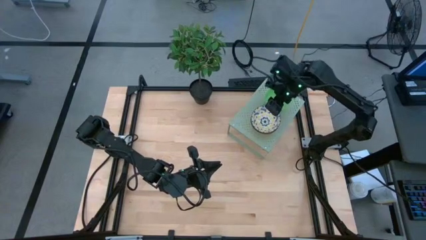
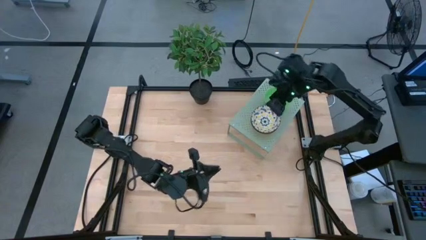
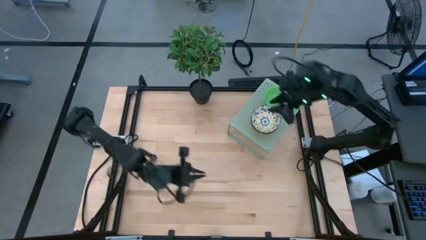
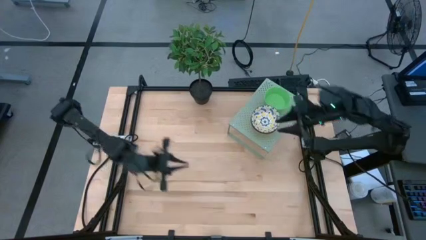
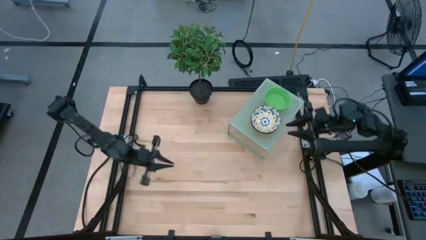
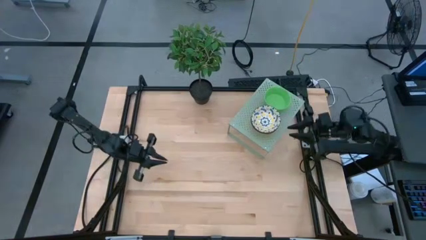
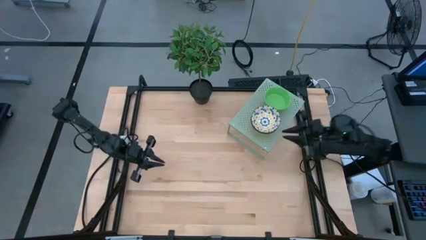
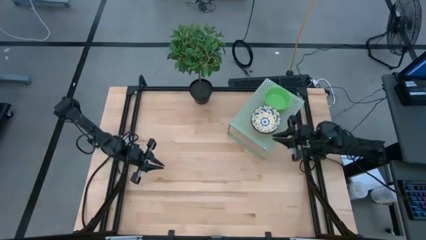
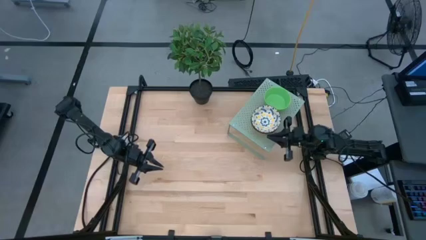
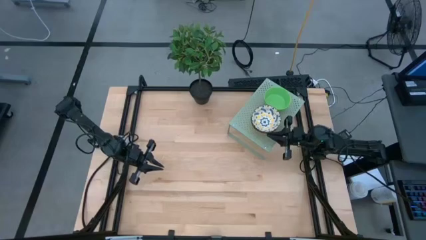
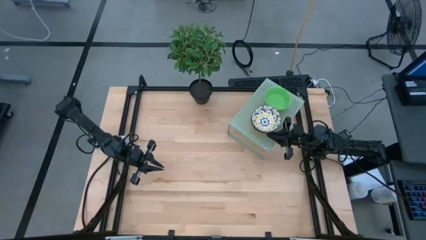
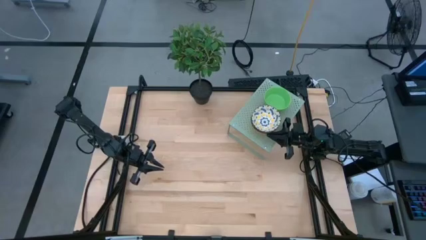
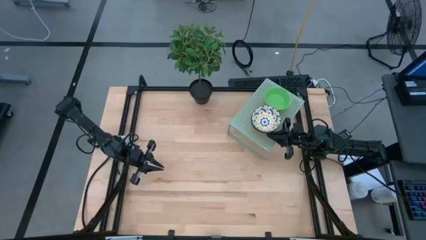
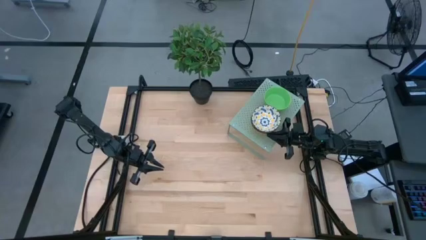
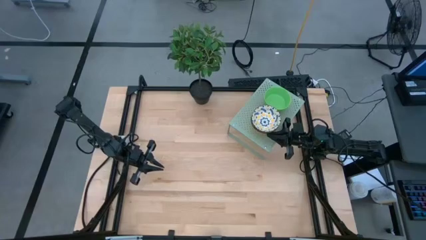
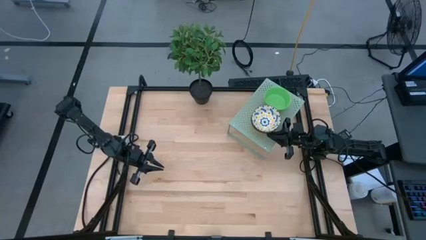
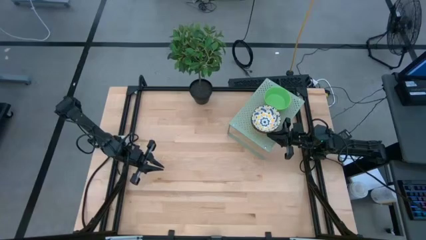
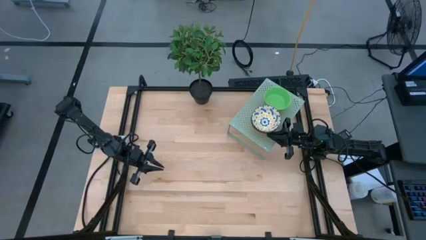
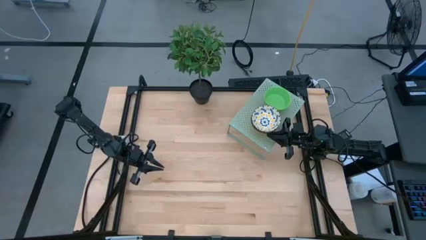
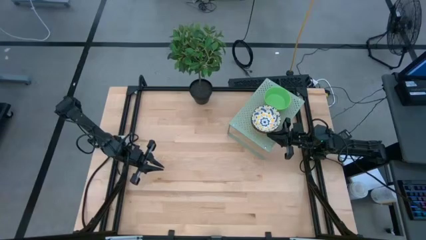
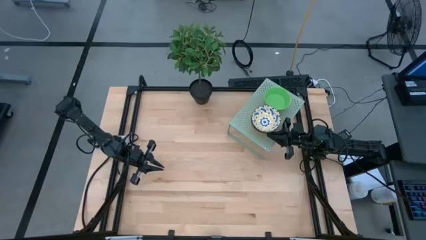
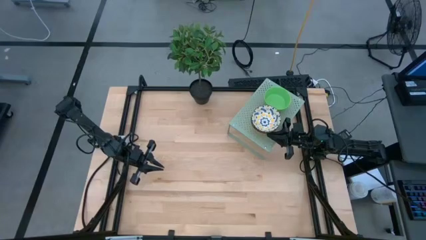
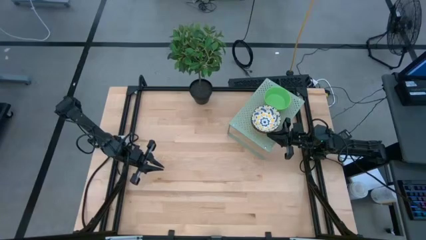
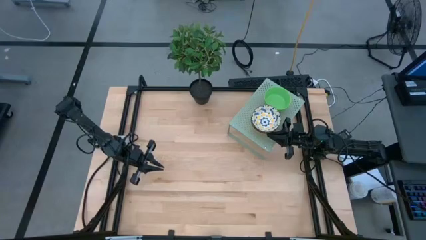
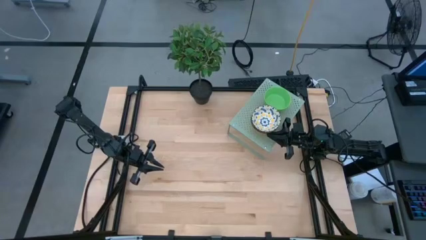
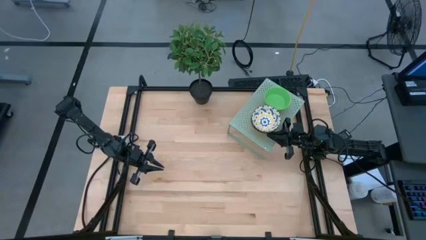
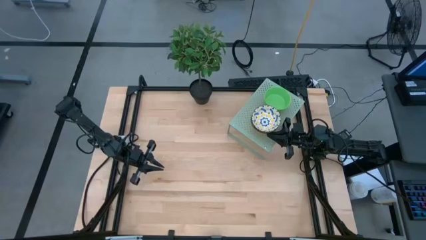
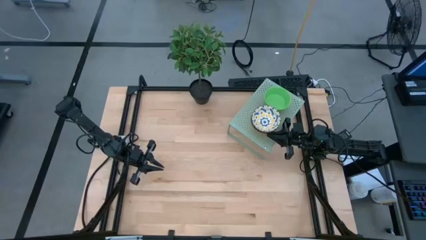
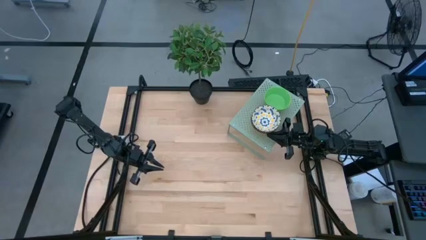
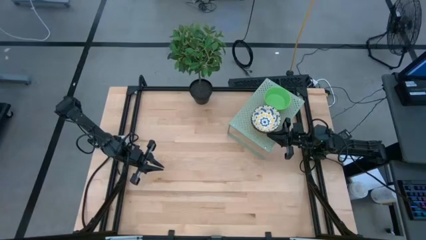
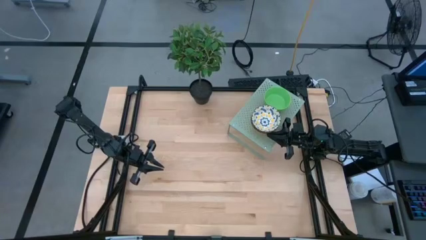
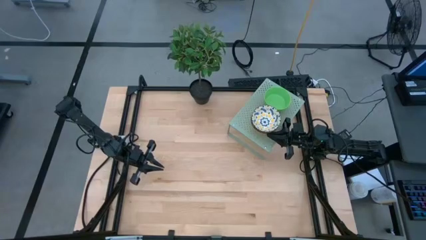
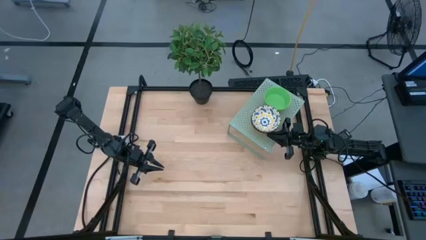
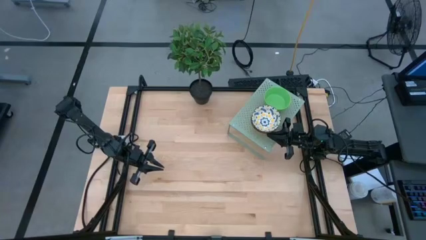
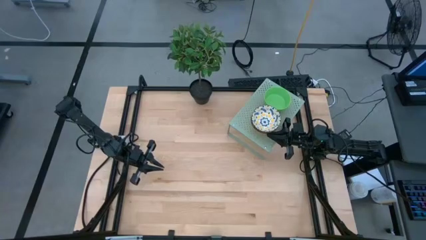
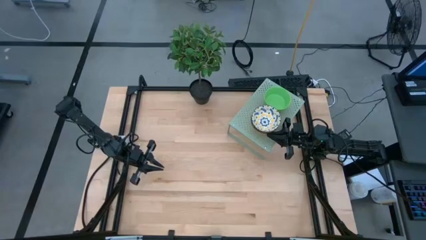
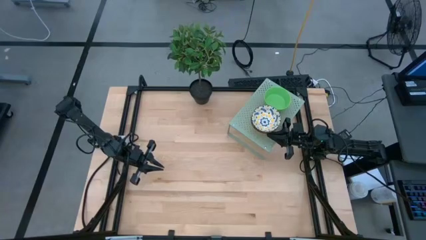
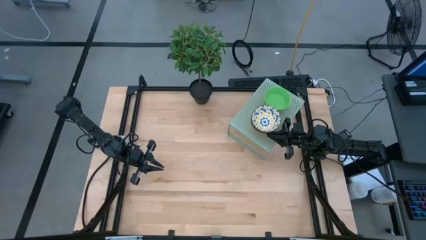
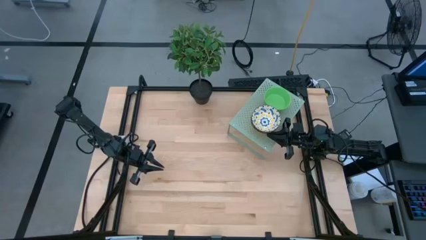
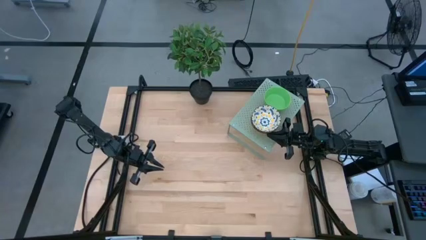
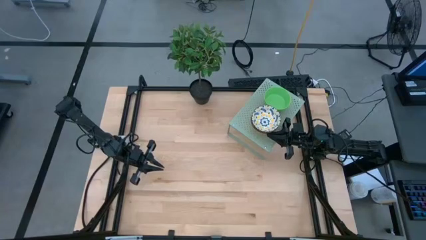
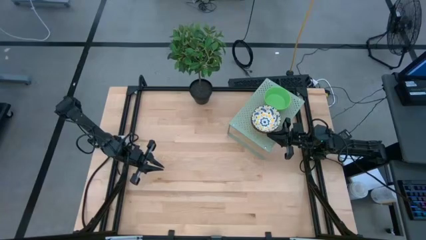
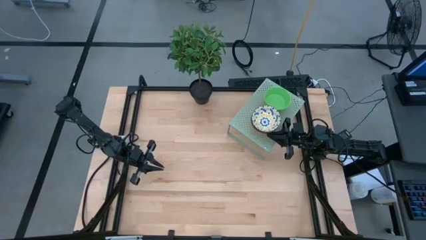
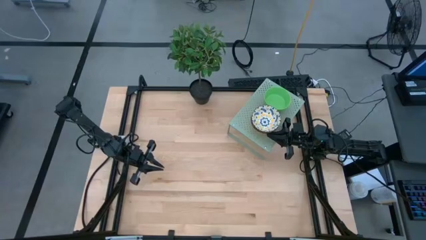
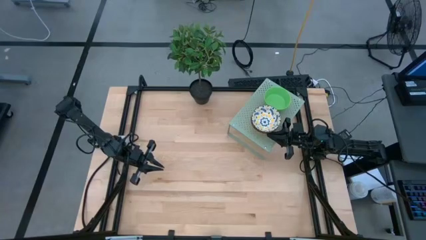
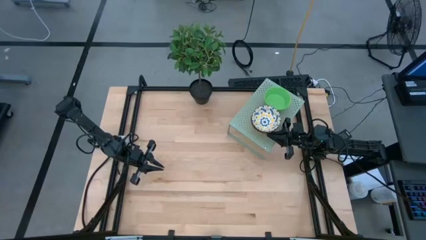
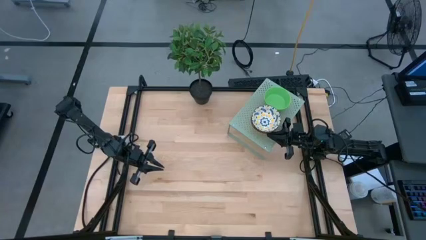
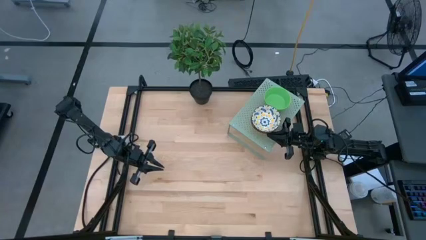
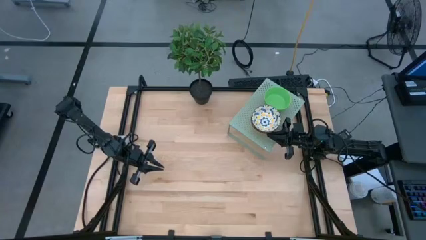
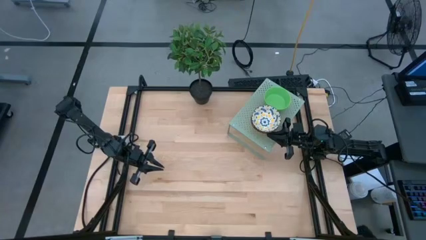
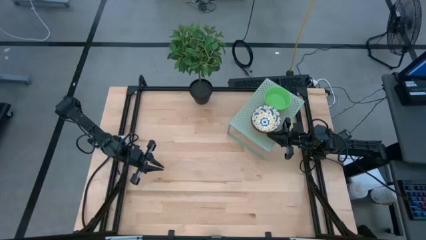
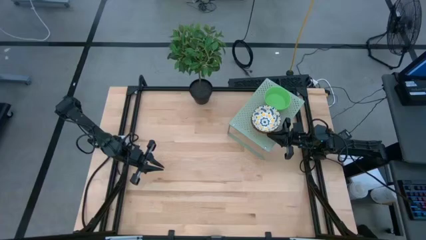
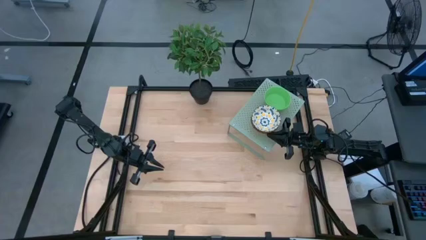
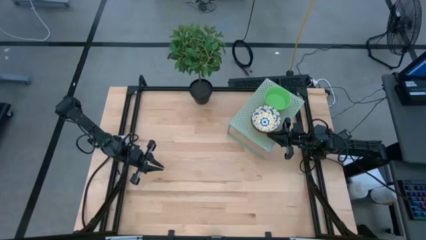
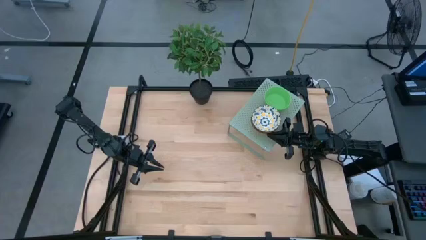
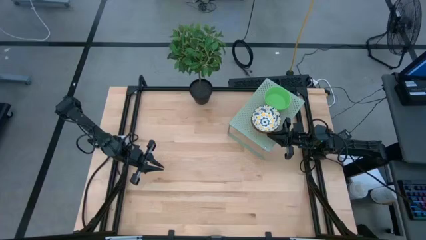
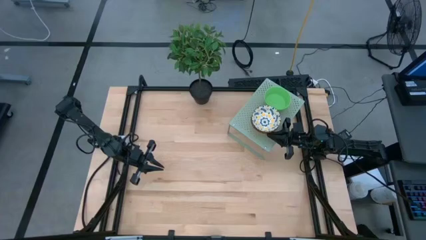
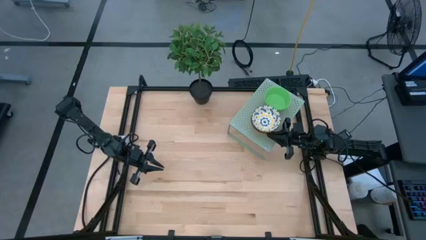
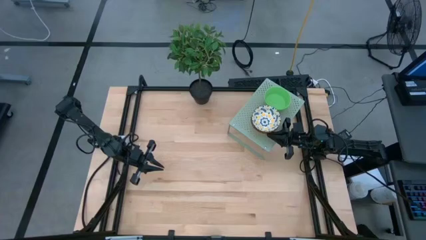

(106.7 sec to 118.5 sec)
Task: Pick & Place Mini bowls
Return to Home Position
